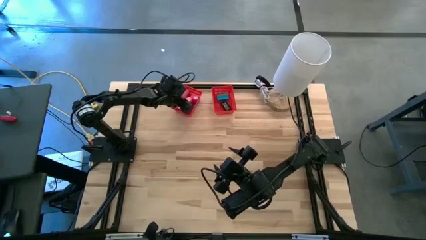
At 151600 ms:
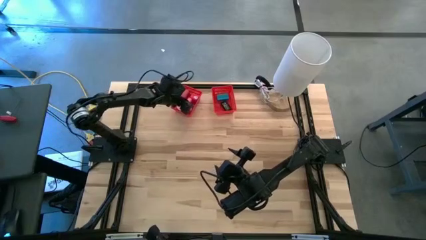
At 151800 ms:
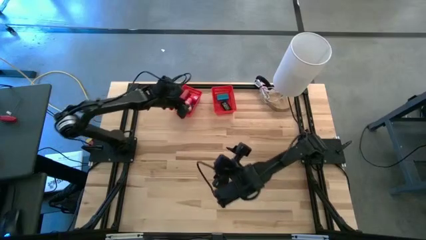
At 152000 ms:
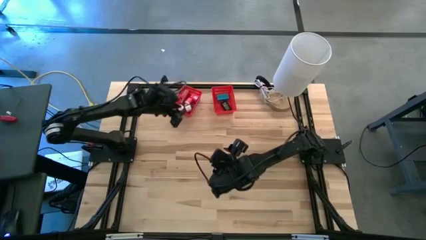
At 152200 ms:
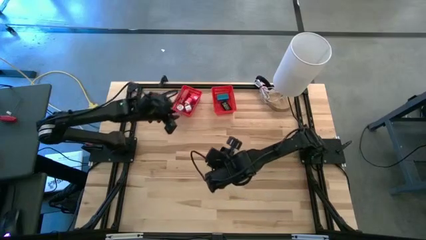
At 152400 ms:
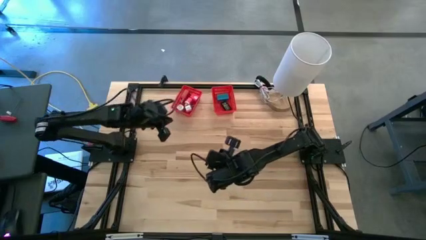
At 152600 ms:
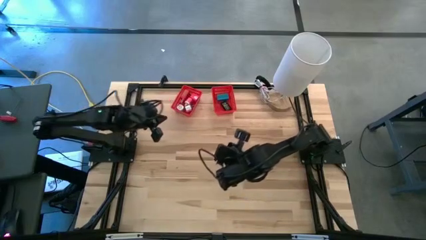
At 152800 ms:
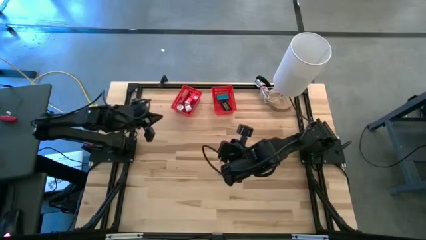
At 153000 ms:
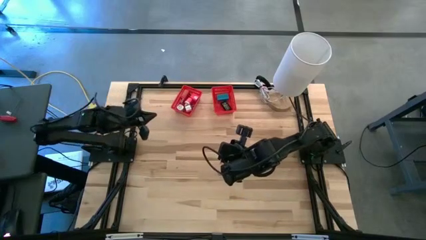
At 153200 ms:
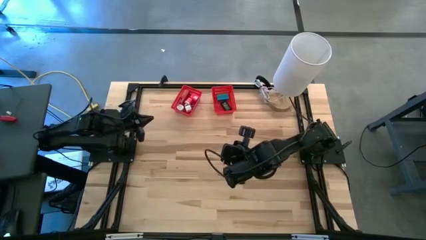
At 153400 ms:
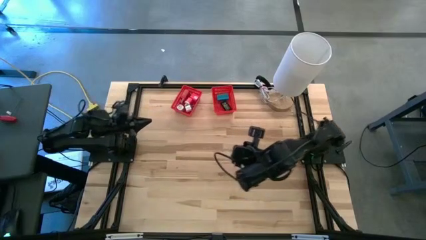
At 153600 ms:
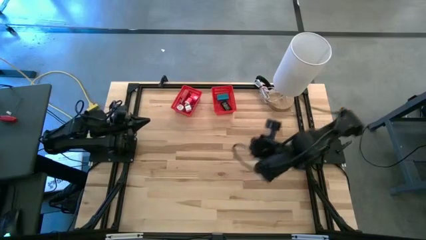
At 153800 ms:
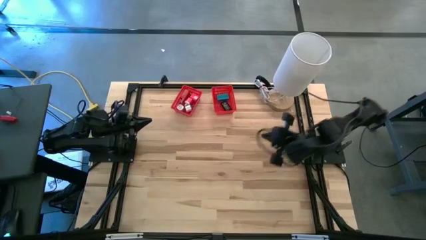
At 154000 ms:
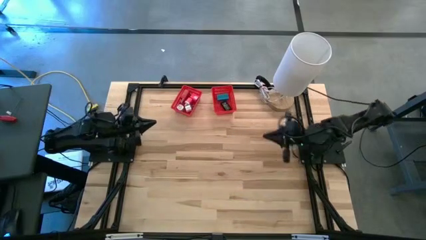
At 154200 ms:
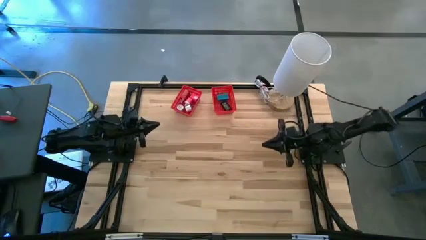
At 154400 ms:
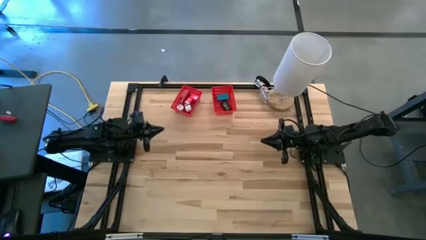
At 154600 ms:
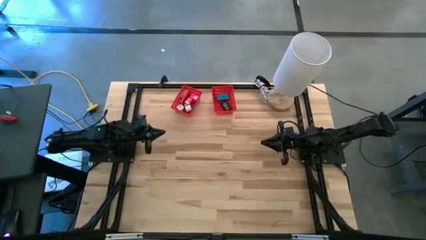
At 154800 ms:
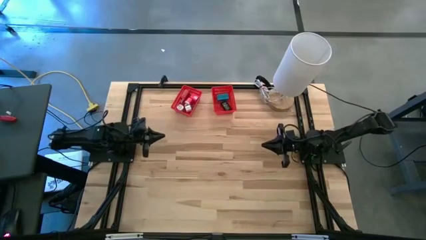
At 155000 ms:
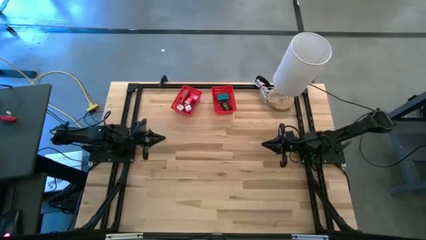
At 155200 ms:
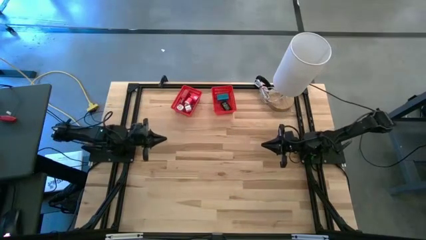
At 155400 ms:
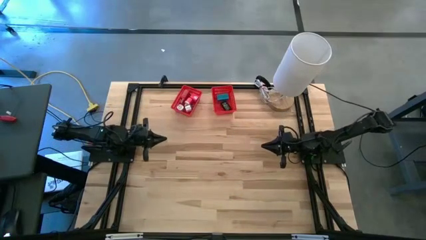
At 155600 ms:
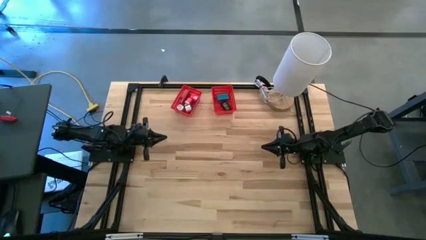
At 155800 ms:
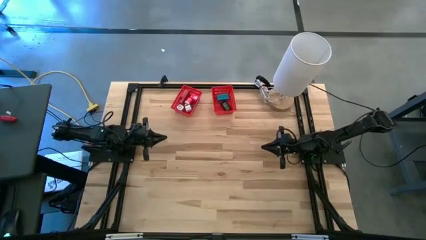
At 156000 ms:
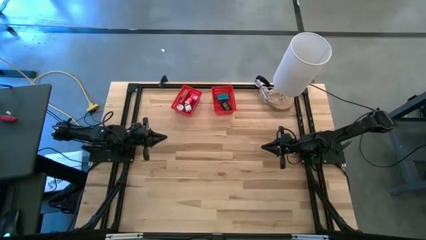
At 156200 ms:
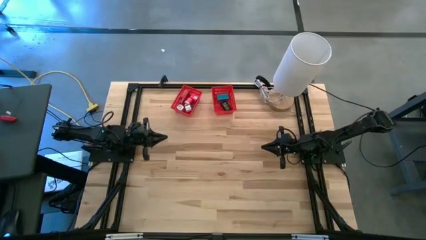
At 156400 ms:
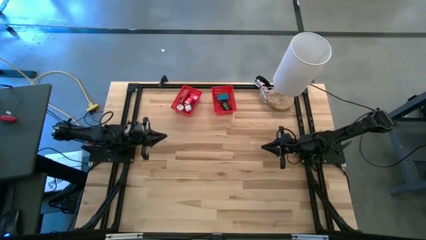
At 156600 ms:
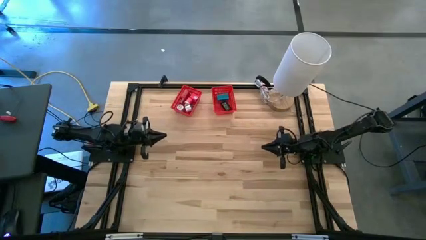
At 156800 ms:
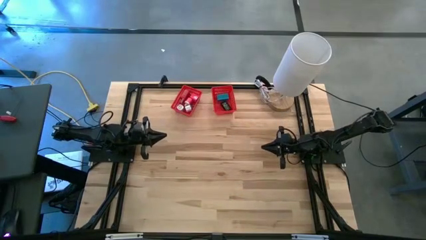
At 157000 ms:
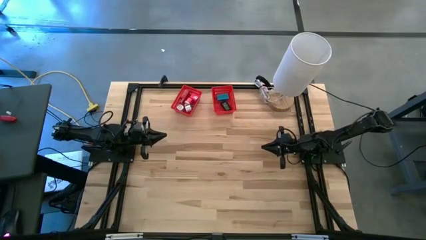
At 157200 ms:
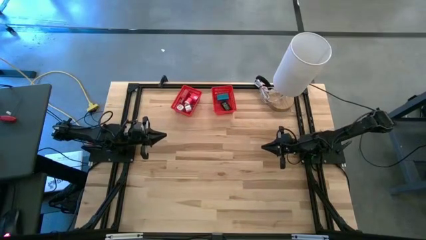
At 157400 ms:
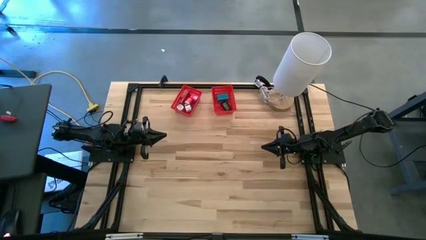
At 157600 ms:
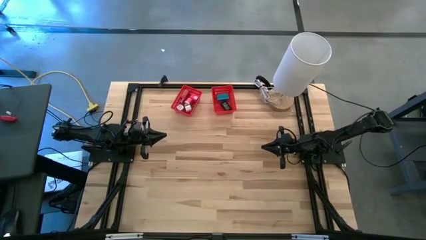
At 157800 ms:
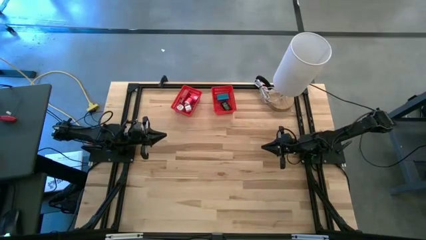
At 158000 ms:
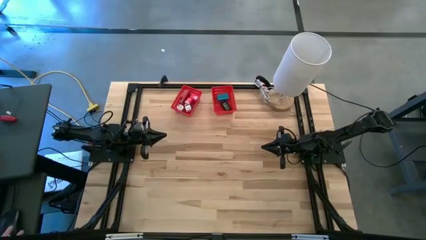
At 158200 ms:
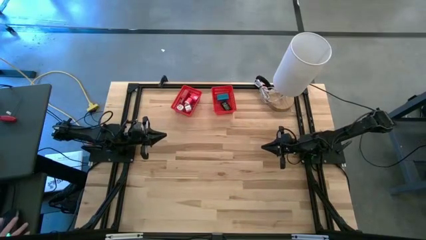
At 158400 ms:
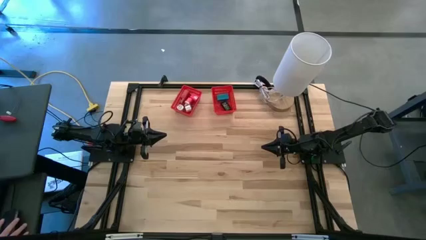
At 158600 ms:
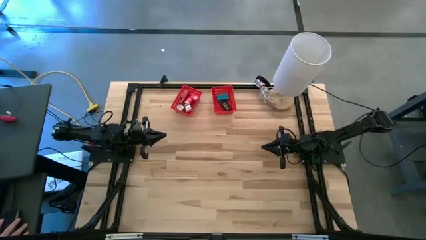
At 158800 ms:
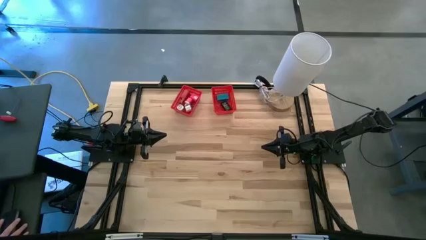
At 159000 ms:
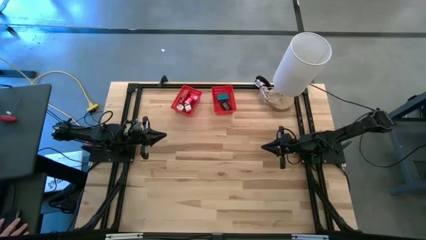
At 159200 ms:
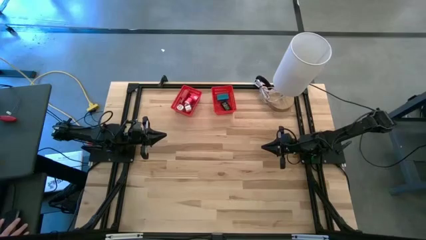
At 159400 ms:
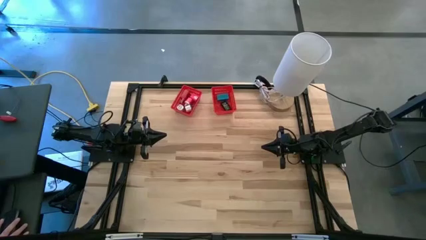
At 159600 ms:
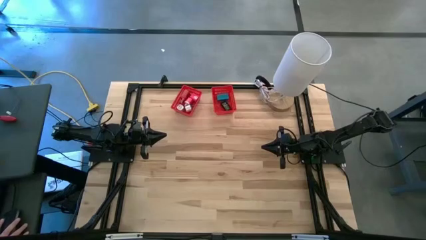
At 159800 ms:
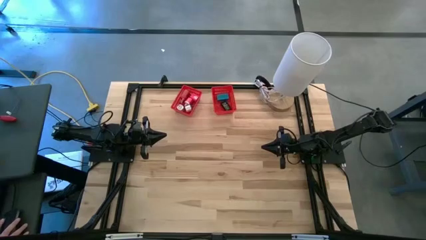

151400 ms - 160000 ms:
Task: Pick & Place Office items
Return to Home Position

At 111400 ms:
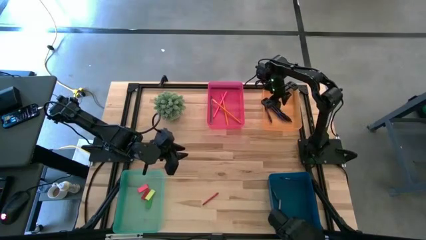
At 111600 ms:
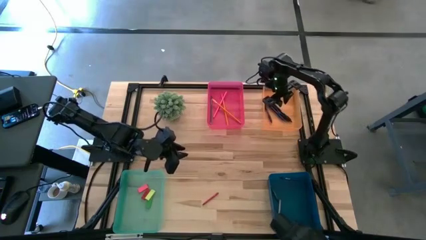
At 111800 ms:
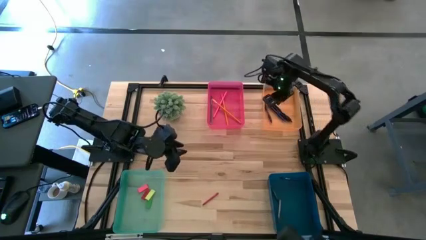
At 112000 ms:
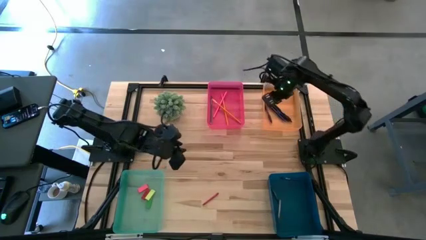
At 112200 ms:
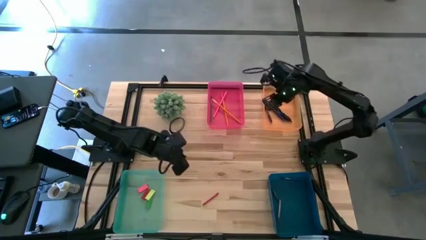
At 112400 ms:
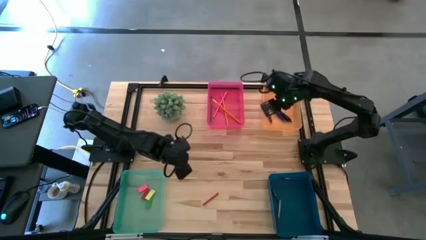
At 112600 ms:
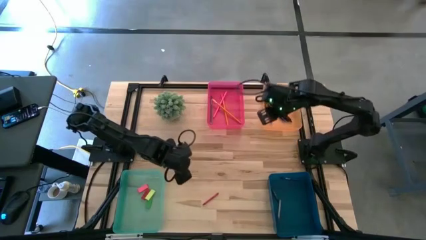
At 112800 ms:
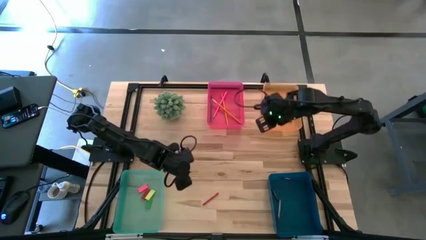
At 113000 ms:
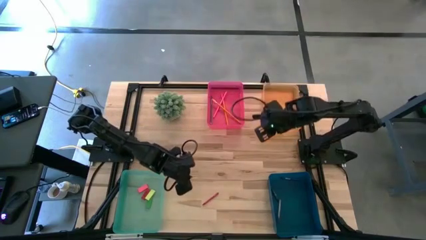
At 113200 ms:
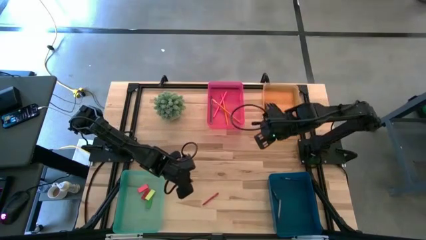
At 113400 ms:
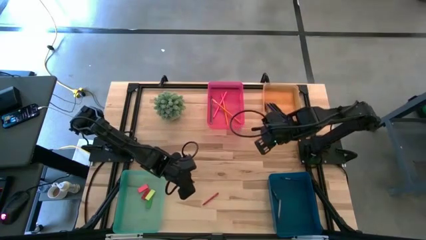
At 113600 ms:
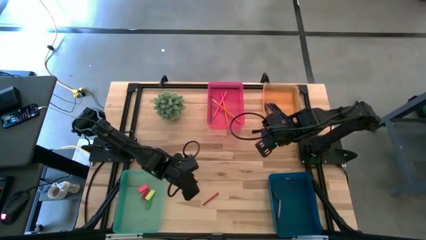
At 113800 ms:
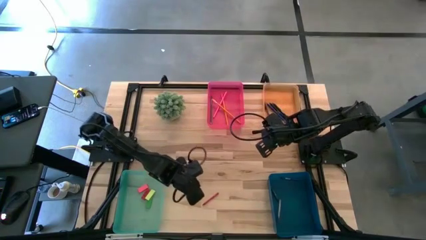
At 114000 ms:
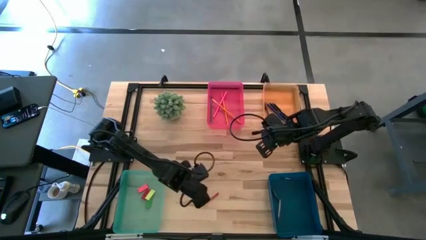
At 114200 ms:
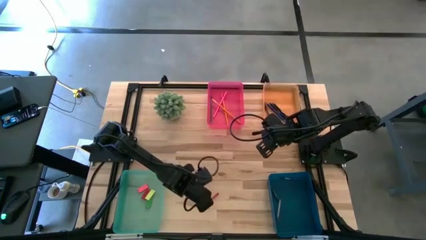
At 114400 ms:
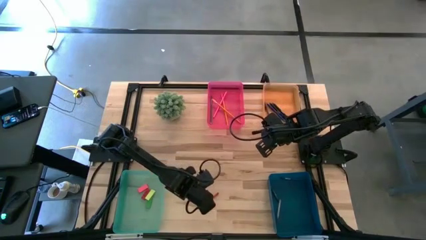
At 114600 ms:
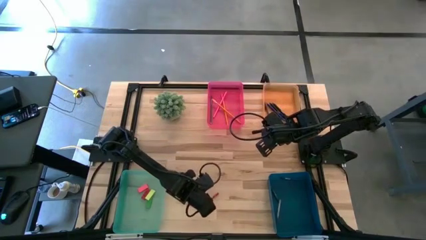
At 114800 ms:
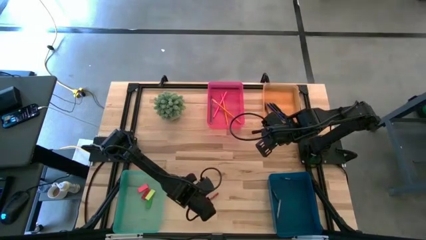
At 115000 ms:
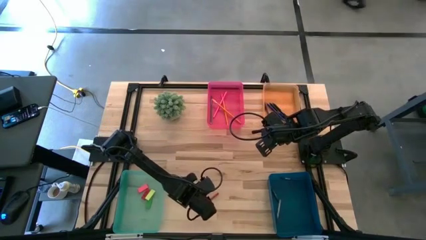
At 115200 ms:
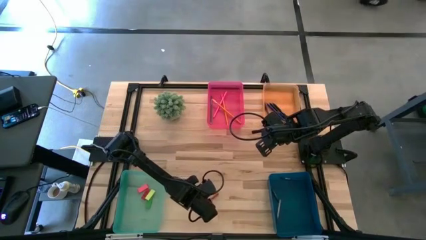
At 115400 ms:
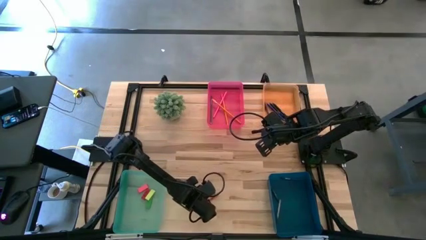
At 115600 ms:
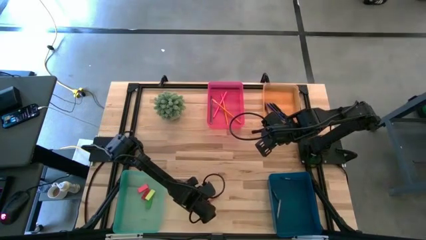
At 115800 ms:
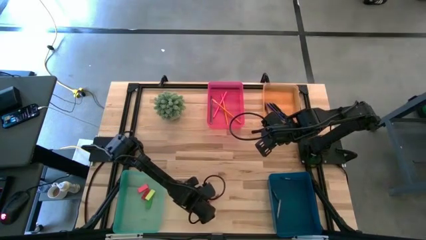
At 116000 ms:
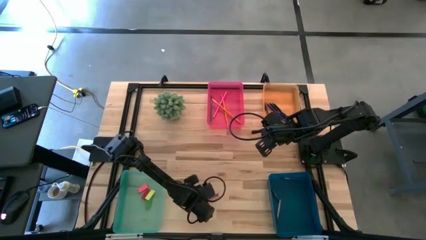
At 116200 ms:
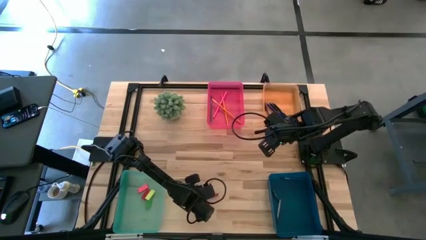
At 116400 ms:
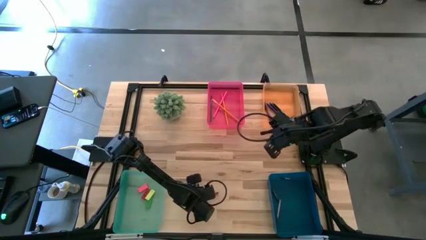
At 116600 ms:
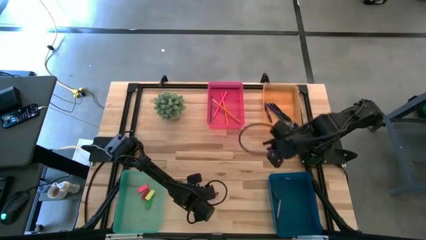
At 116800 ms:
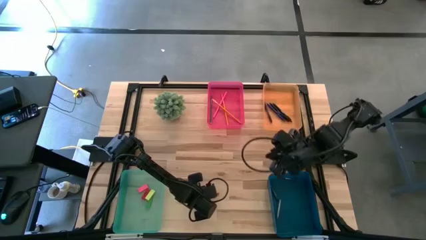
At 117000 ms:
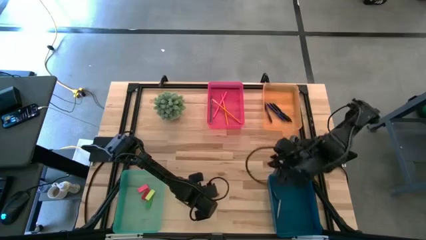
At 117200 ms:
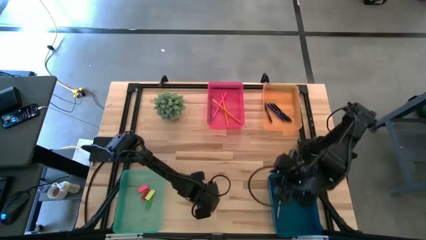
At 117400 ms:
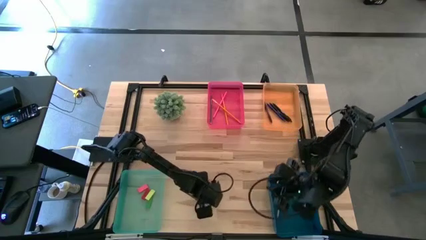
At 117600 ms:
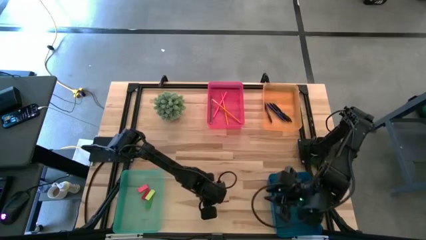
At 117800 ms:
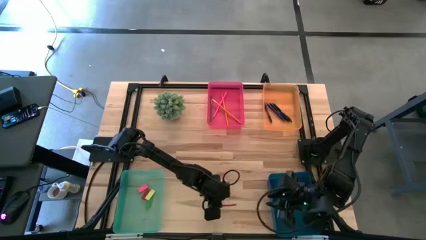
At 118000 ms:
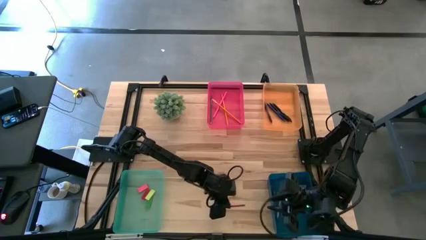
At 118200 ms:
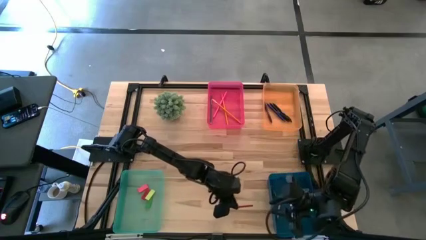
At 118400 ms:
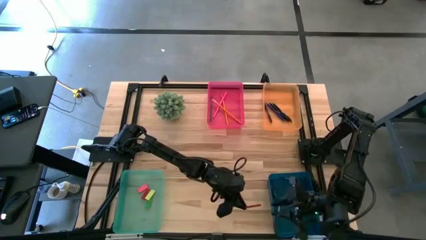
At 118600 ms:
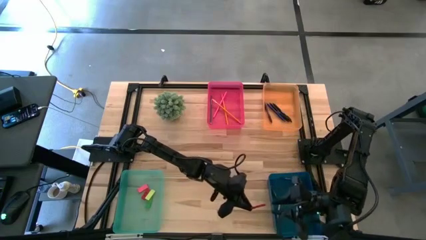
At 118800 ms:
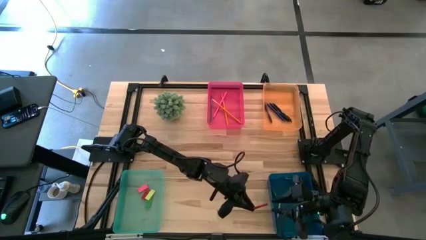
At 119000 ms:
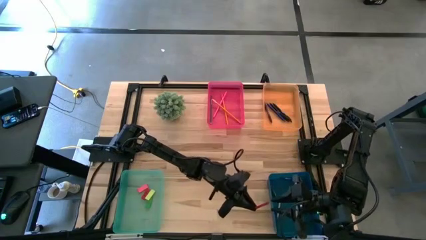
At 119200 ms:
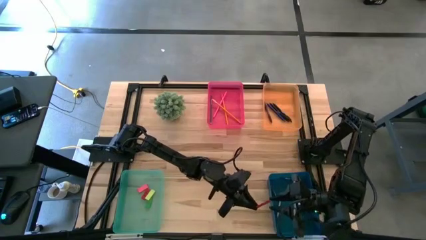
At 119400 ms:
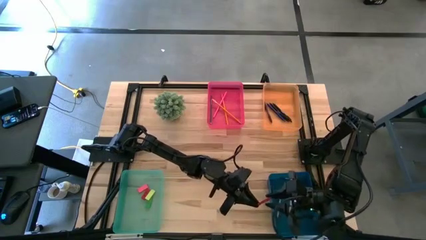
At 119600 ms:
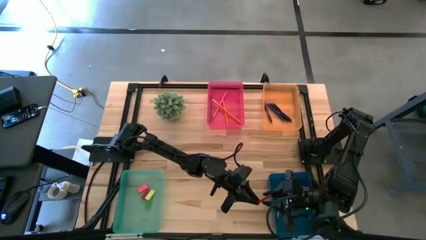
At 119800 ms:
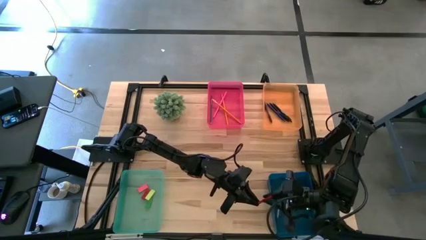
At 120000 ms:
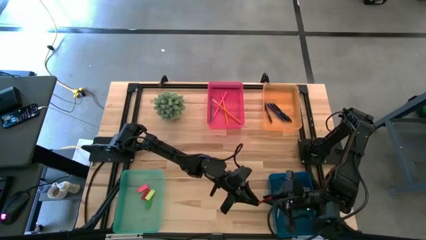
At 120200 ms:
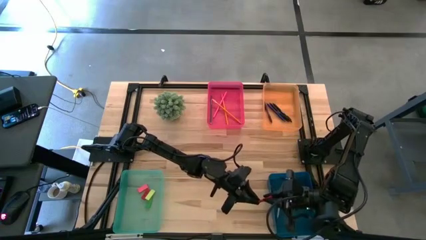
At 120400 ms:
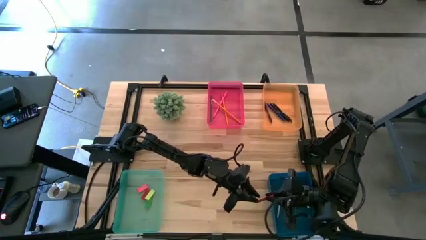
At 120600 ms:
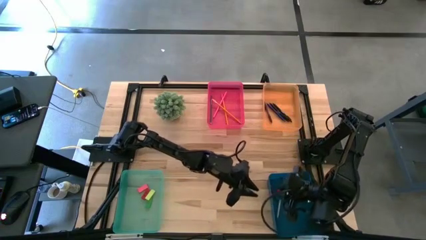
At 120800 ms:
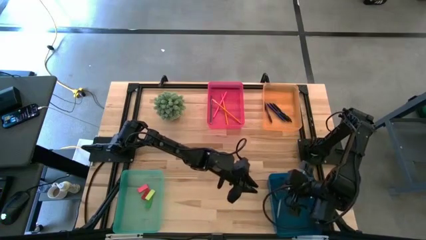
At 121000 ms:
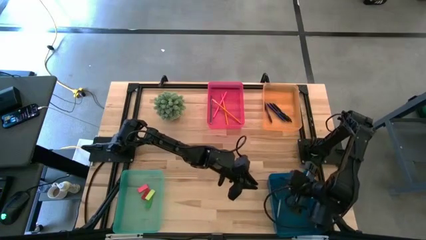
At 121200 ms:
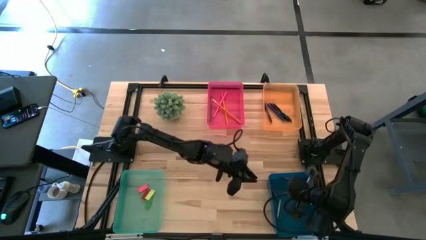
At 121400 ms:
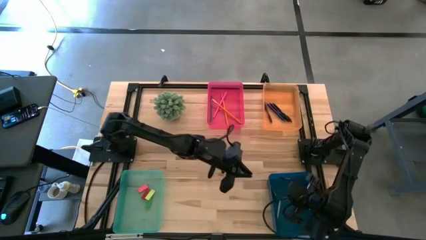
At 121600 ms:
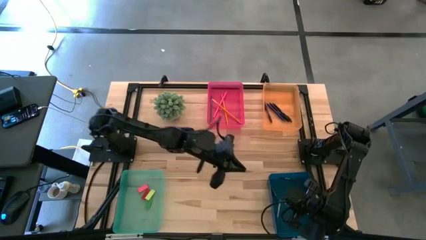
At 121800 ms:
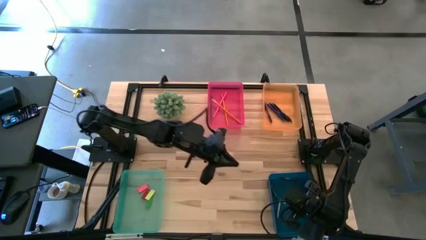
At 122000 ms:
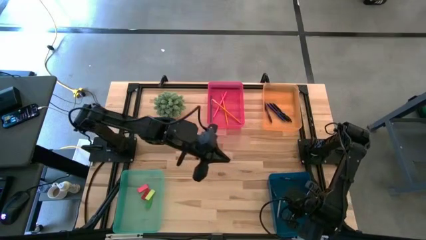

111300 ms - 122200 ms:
Task: Sort crayons/erasers/pens/pencils in bins
Put the red crayon into the blue bin
